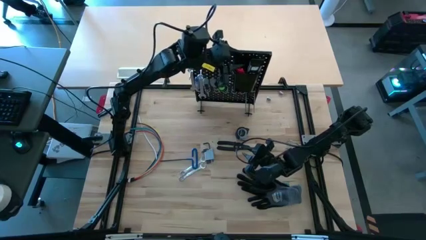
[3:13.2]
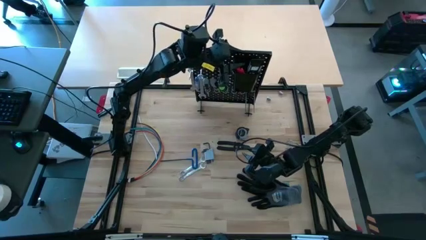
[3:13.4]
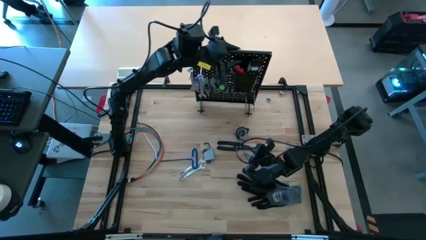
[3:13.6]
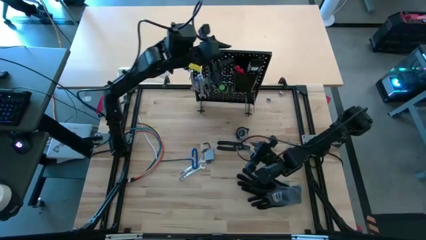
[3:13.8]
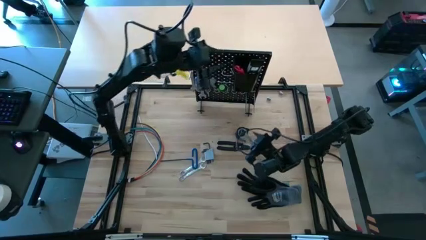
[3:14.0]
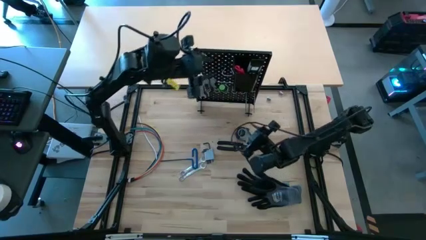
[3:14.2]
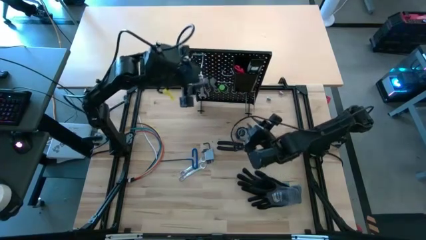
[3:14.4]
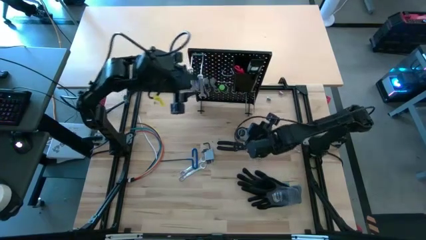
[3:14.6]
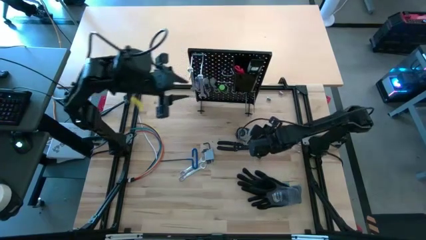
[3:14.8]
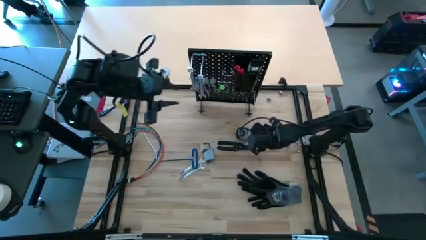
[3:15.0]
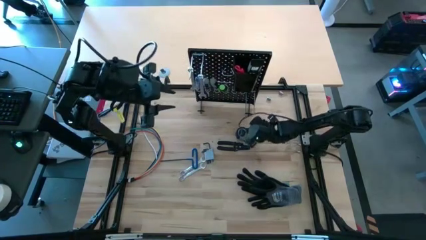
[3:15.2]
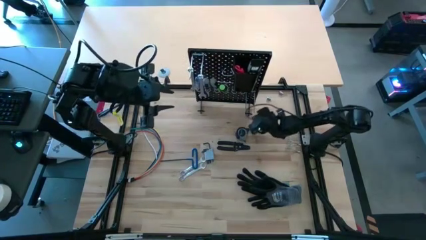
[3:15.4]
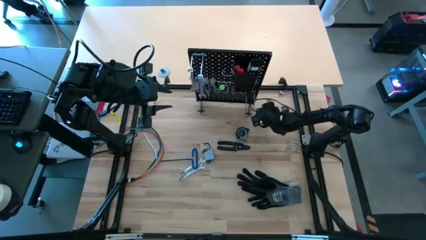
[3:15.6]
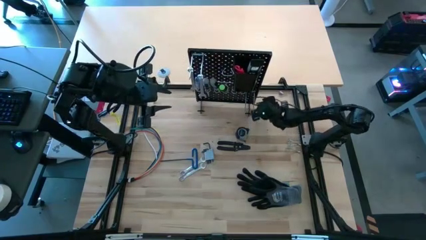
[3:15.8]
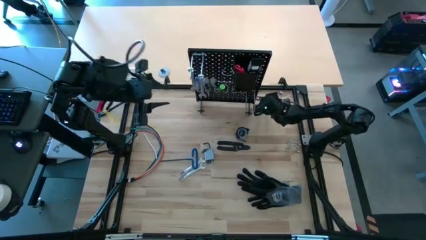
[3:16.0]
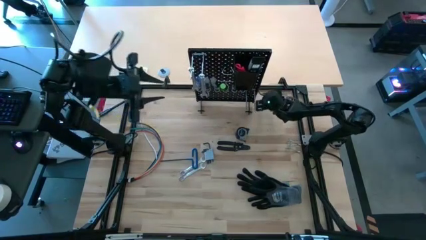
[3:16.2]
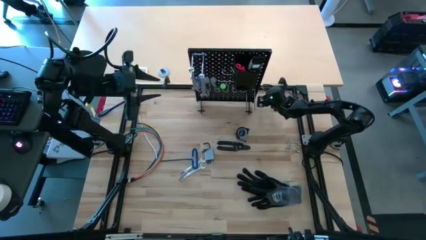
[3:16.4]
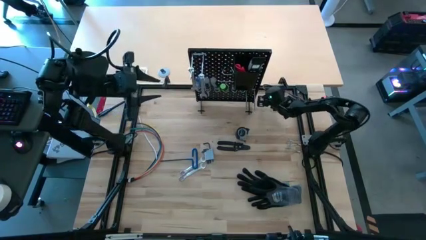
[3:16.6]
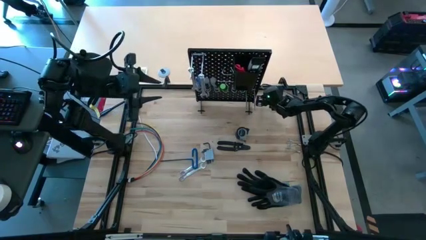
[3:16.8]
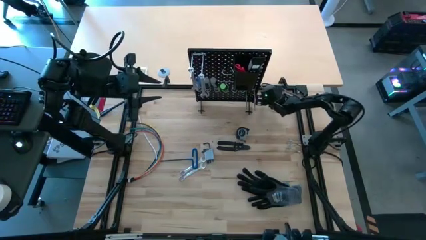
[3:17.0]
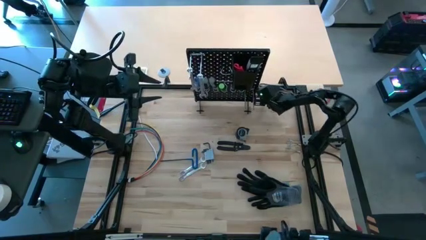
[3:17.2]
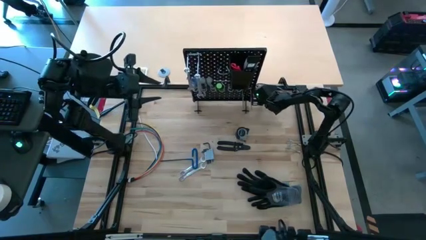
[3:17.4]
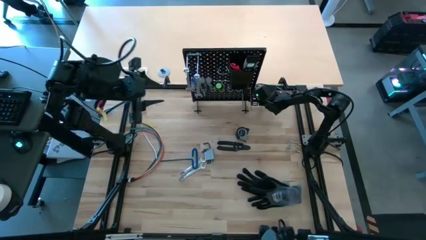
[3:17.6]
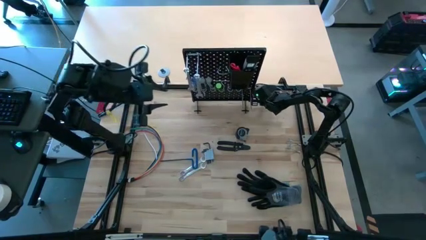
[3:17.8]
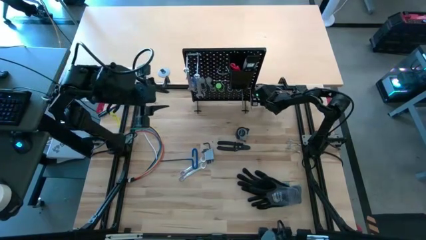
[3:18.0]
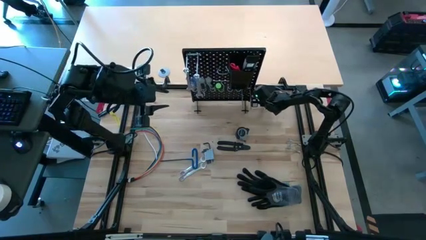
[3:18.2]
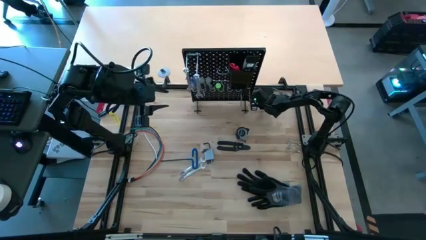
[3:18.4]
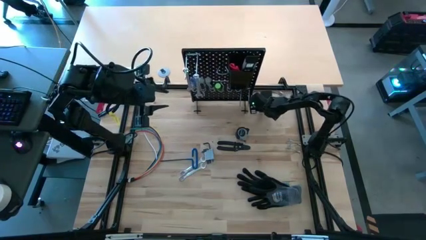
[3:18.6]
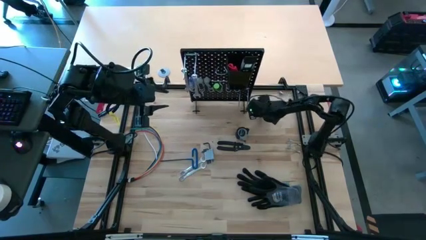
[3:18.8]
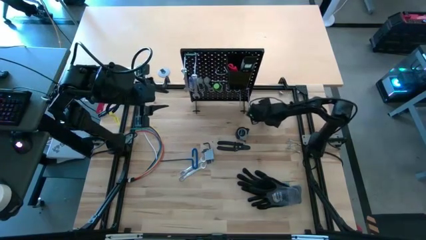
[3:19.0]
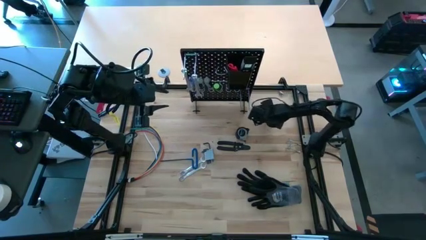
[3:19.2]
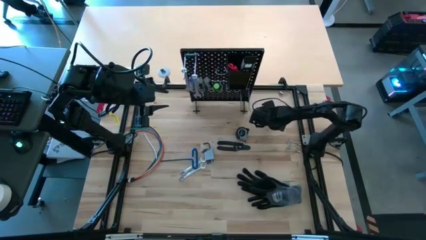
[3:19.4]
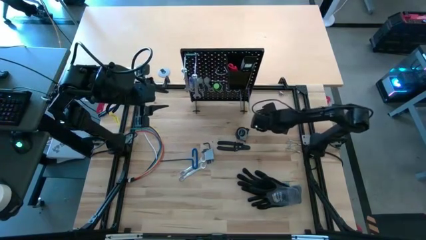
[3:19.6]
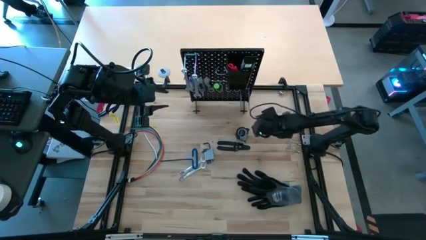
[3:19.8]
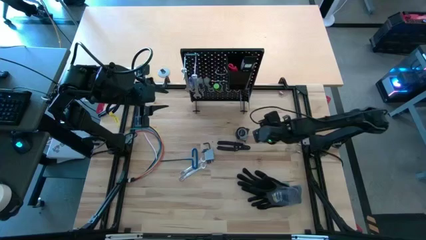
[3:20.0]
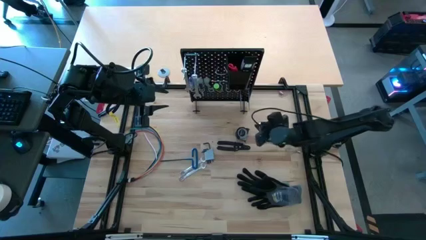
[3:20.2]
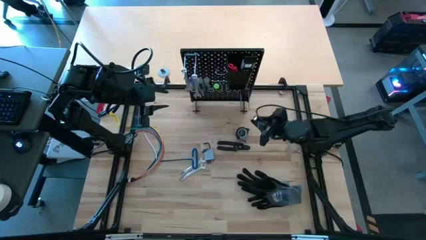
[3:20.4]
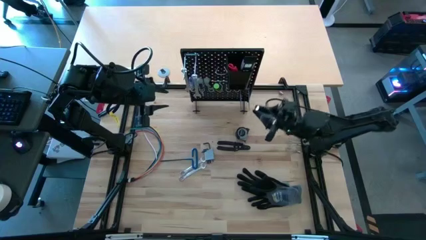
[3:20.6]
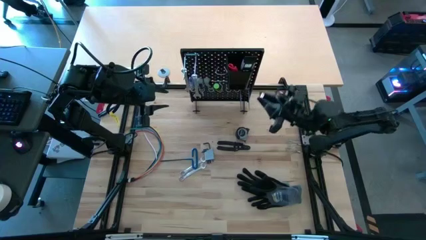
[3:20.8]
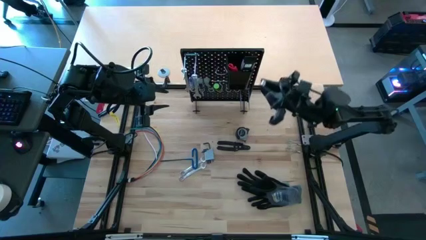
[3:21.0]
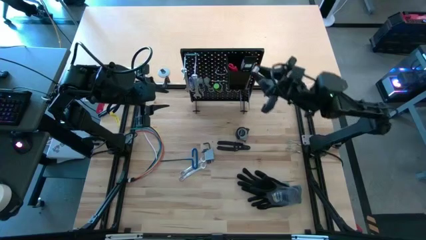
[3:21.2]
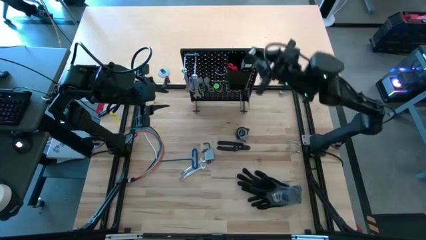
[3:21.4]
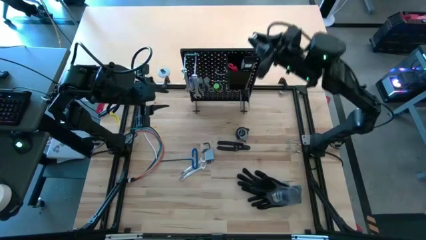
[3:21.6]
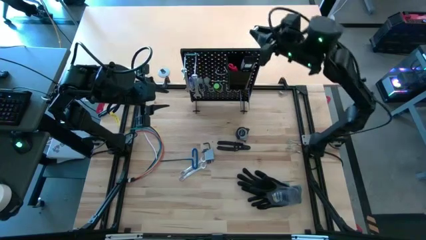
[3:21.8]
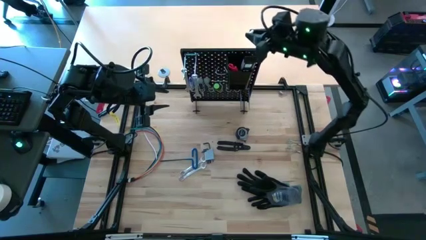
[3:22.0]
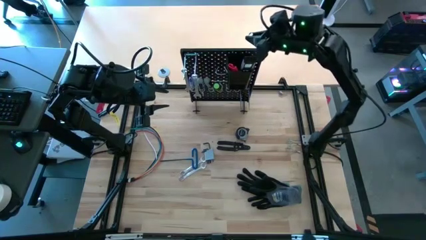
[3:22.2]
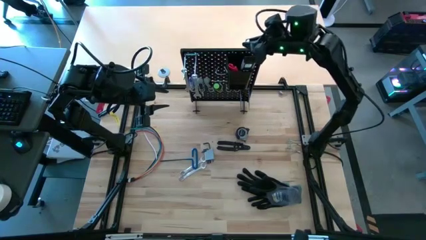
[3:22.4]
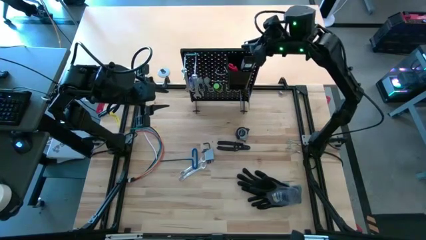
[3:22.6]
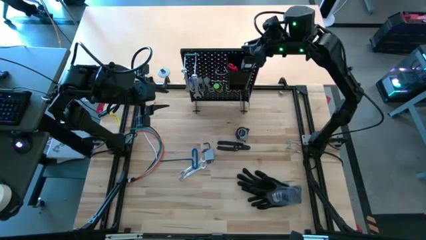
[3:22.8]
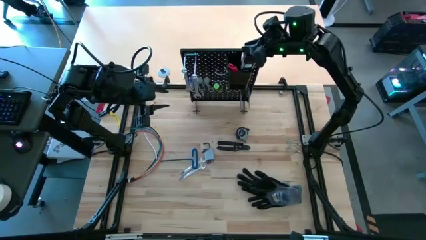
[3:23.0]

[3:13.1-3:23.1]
Task: Hang tools onto peg board
Put the socket into the black bin on the peg board

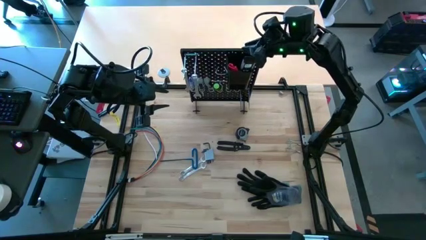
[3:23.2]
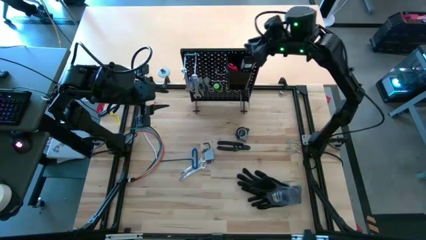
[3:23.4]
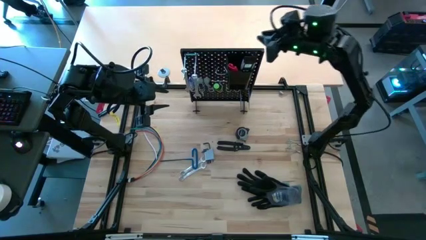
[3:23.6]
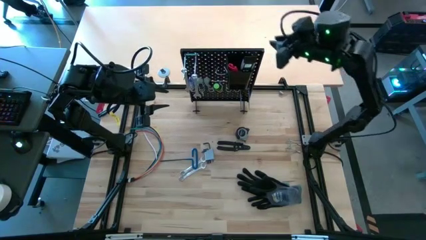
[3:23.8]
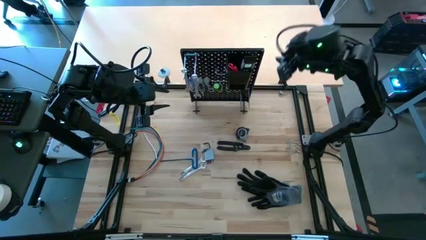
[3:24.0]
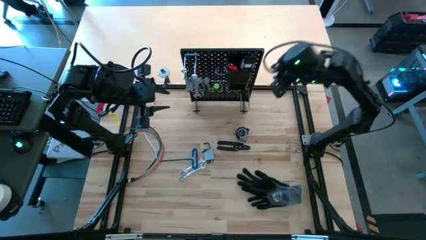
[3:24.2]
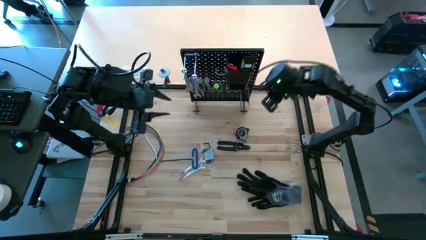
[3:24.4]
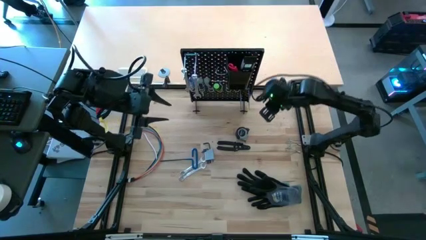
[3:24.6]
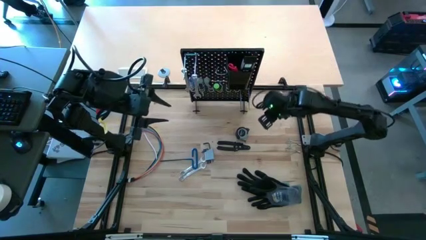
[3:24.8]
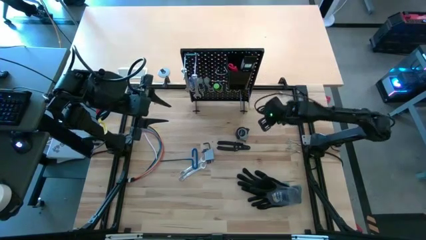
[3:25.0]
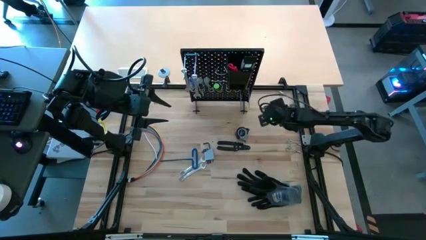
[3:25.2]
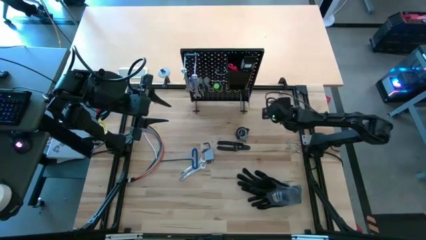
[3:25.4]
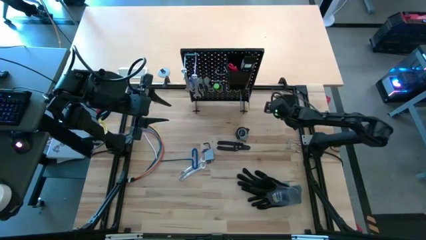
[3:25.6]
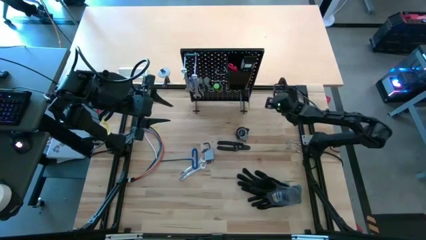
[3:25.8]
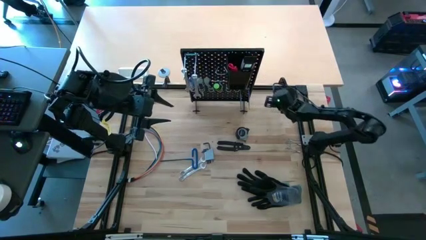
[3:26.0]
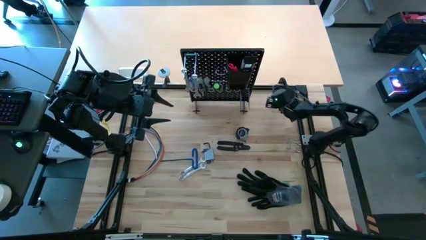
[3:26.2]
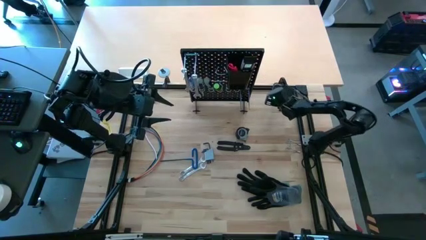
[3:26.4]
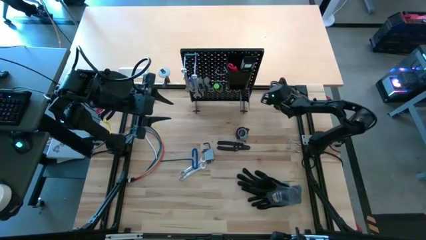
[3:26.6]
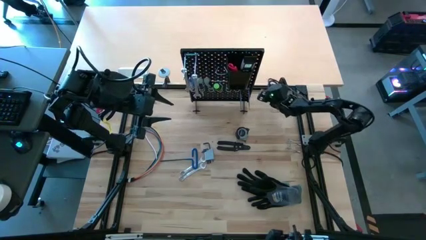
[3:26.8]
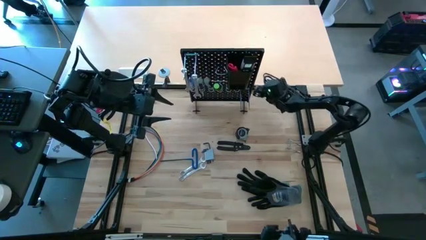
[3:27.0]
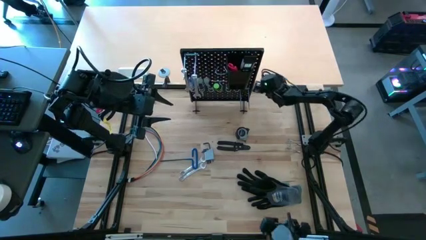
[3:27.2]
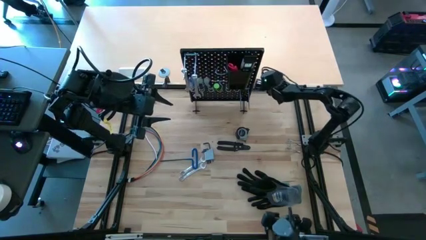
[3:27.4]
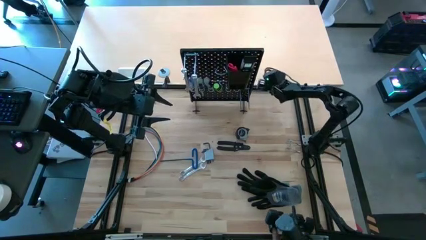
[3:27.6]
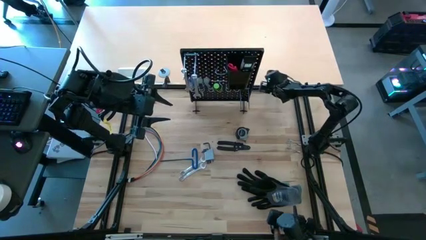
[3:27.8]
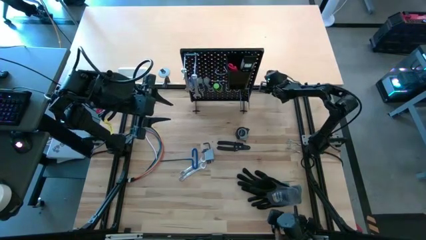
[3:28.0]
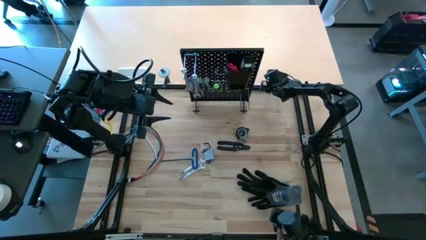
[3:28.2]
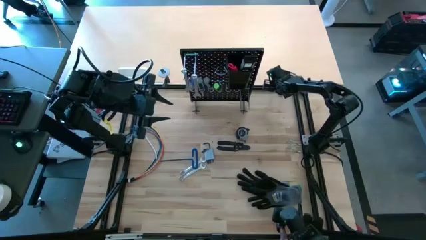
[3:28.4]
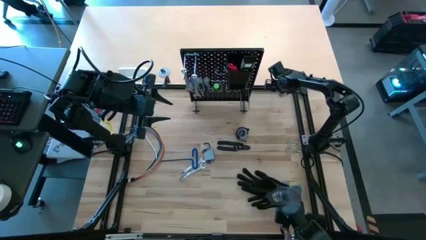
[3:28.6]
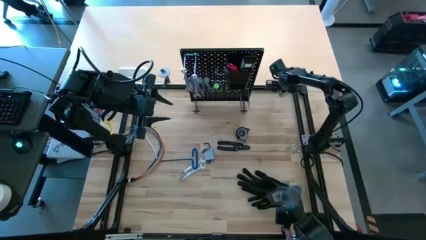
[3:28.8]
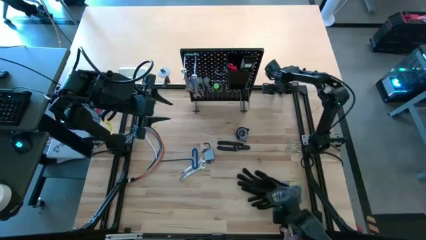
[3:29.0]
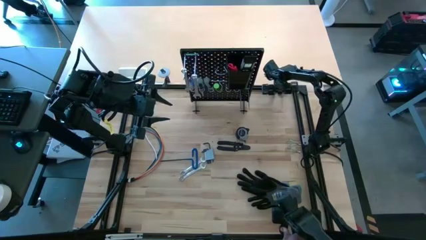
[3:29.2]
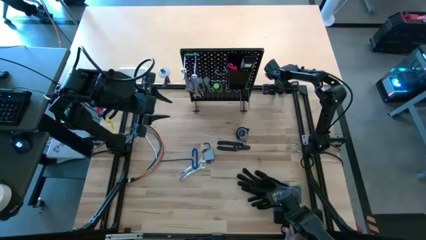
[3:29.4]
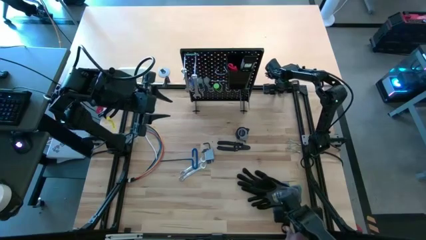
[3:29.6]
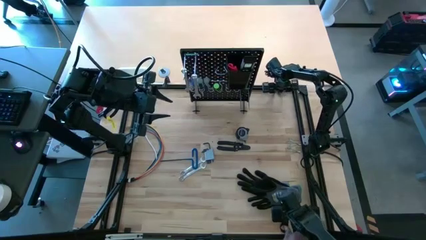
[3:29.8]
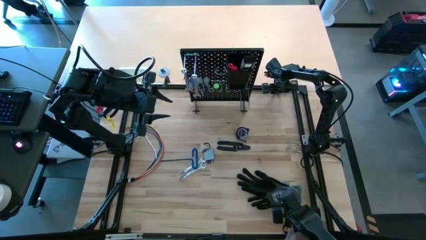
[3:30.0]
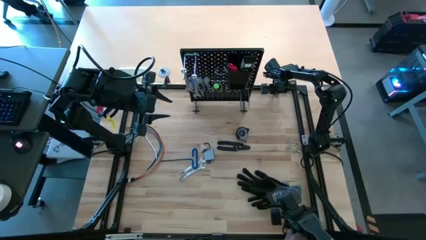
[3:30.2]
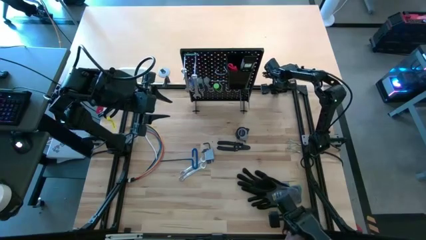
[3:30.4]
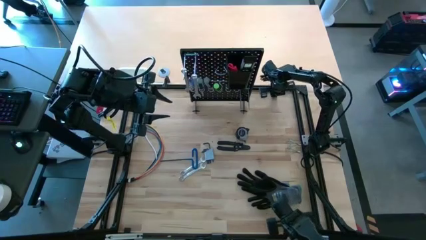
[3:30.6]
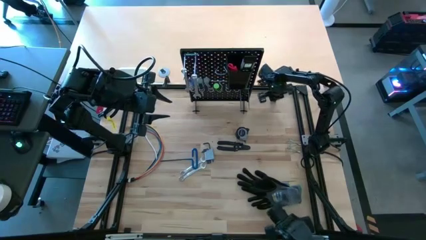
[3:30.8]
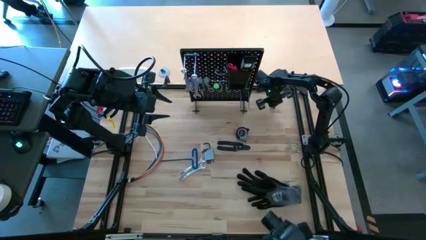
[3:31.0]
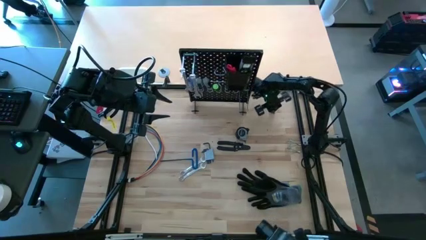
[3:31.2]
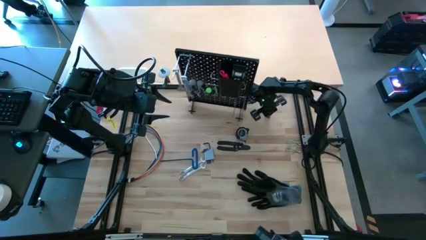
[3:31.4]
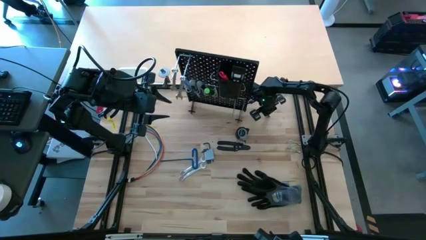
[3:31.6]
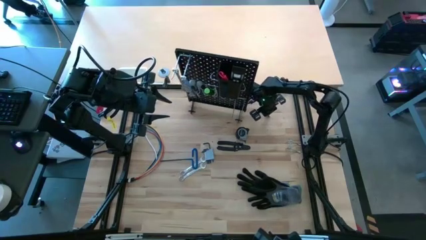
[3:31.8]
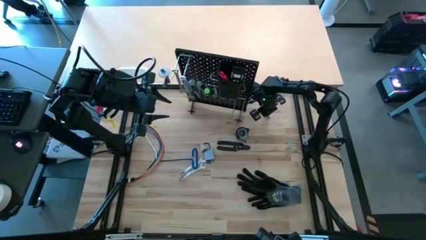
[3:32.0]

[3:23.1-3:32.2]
Put the socket into the black bin on the peg board
